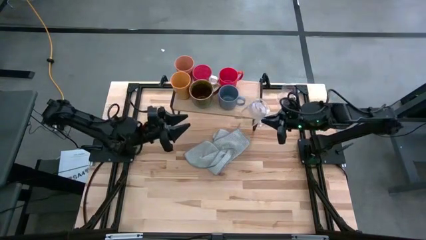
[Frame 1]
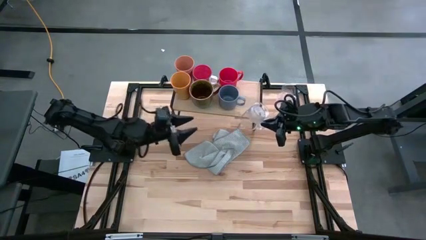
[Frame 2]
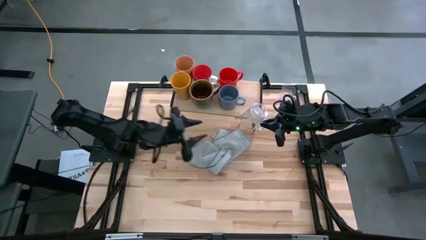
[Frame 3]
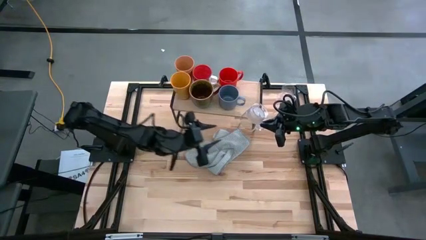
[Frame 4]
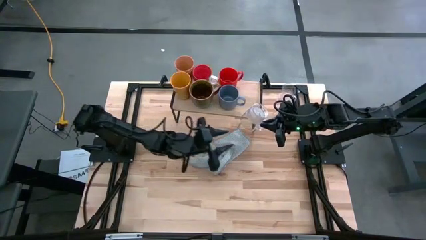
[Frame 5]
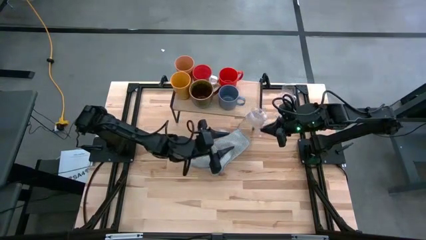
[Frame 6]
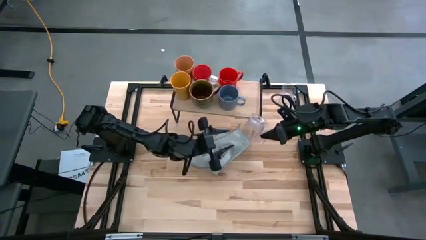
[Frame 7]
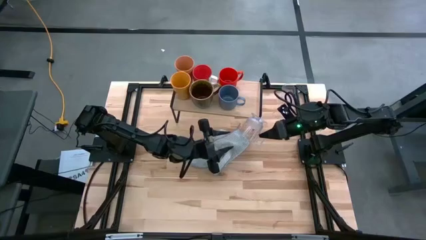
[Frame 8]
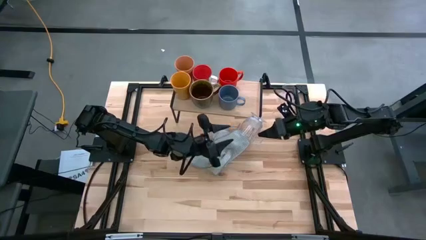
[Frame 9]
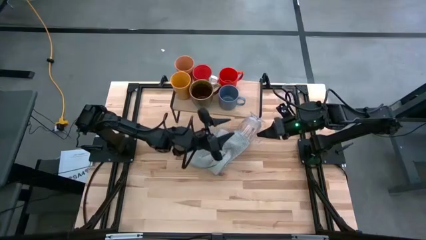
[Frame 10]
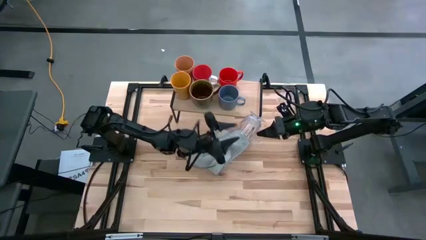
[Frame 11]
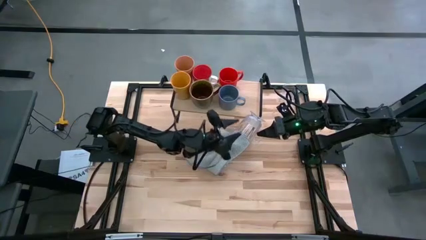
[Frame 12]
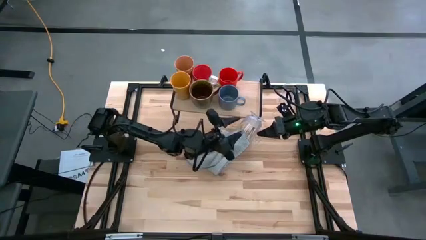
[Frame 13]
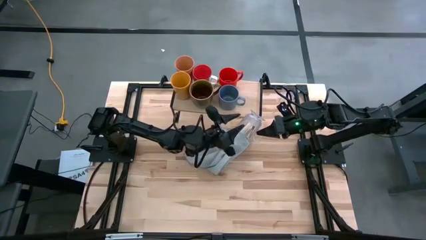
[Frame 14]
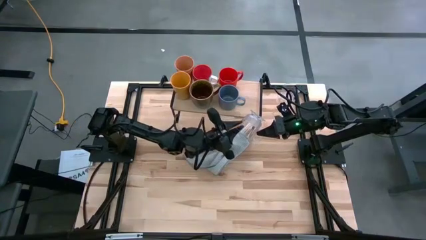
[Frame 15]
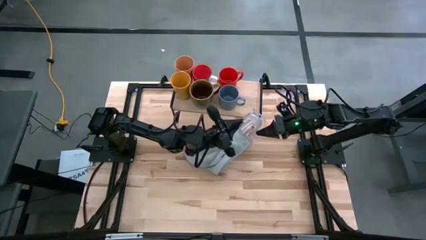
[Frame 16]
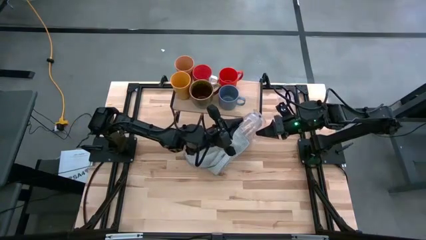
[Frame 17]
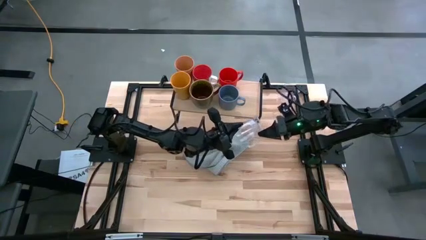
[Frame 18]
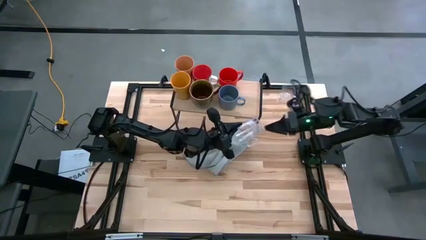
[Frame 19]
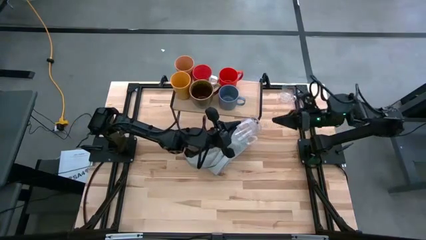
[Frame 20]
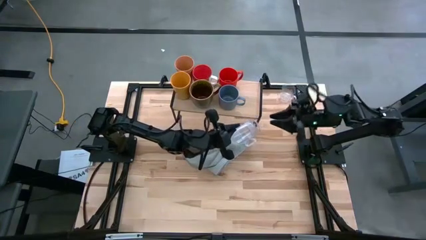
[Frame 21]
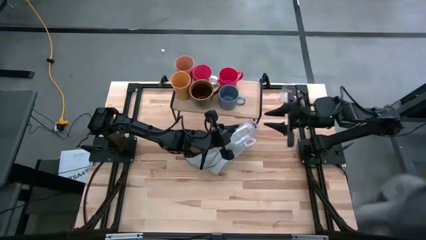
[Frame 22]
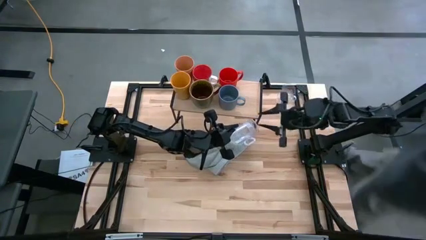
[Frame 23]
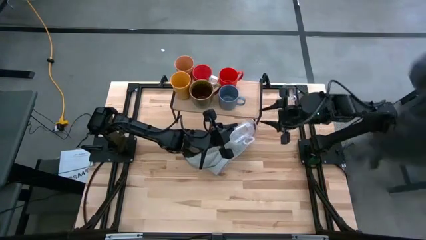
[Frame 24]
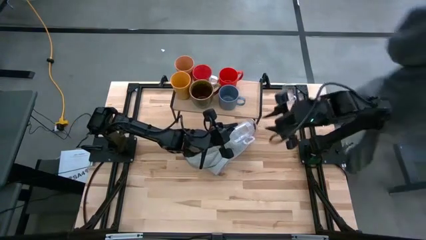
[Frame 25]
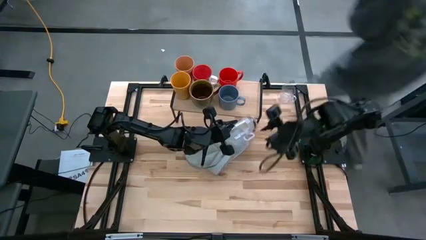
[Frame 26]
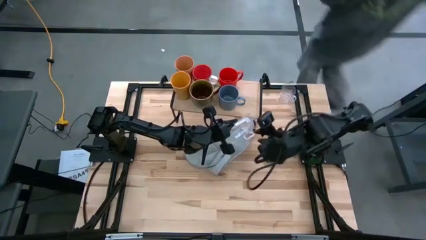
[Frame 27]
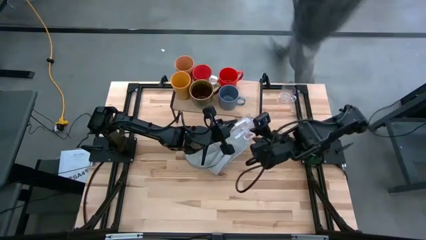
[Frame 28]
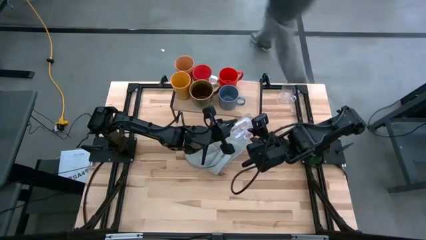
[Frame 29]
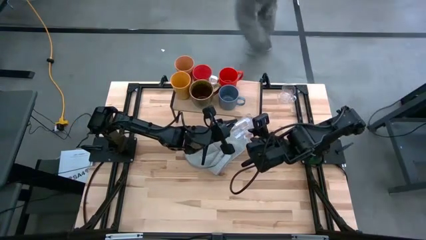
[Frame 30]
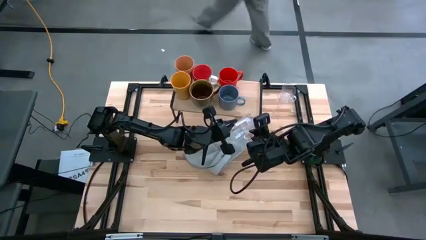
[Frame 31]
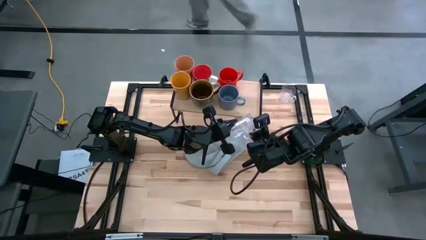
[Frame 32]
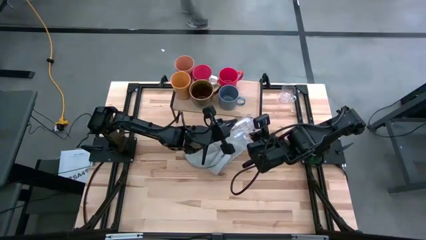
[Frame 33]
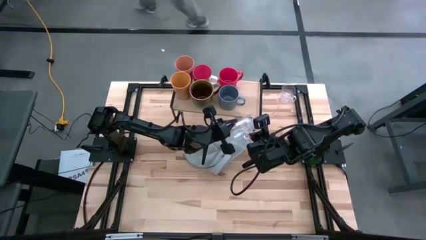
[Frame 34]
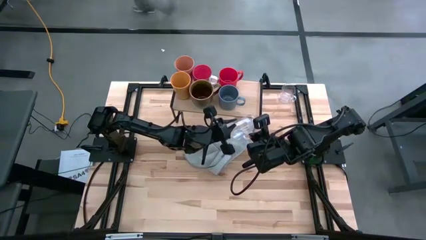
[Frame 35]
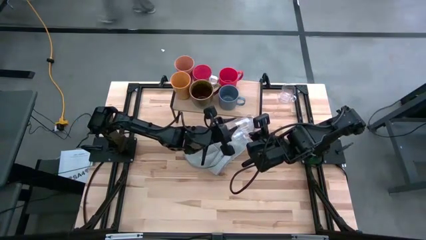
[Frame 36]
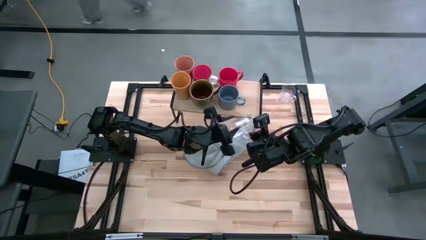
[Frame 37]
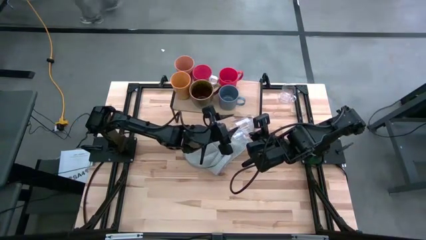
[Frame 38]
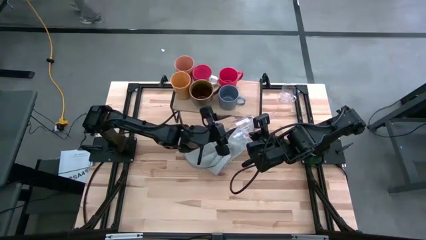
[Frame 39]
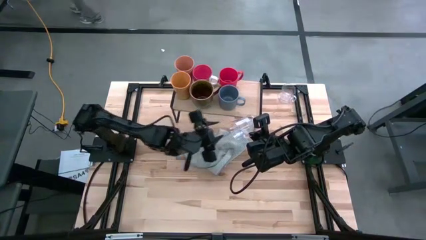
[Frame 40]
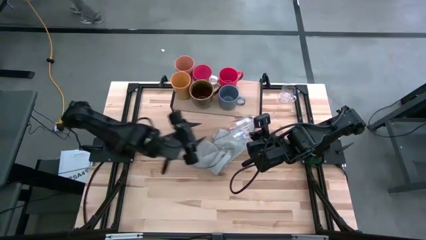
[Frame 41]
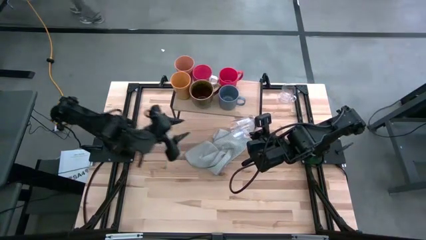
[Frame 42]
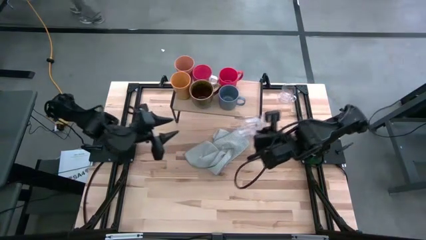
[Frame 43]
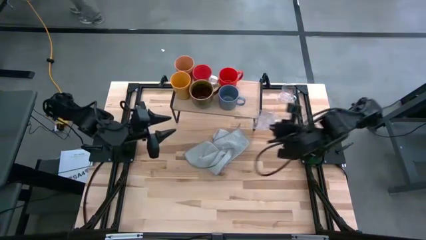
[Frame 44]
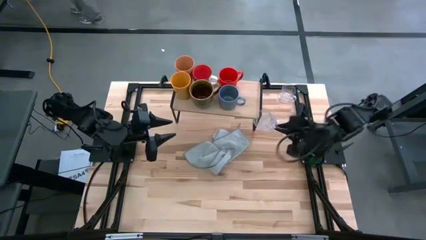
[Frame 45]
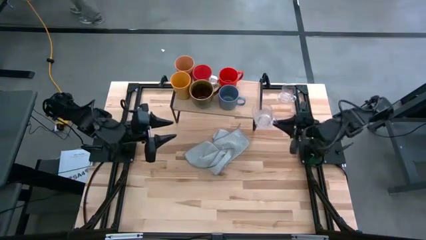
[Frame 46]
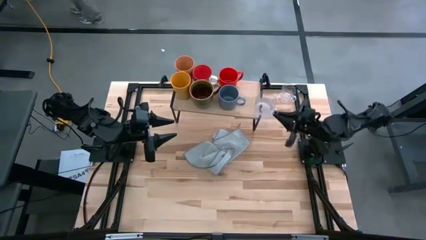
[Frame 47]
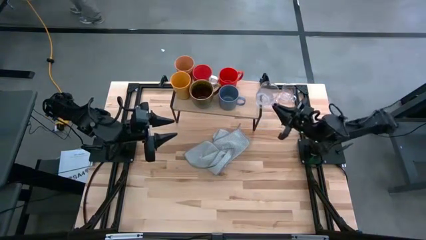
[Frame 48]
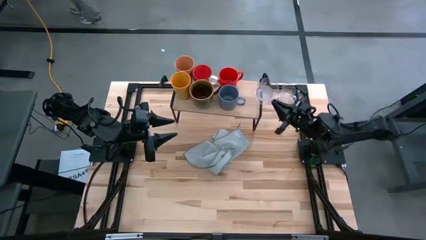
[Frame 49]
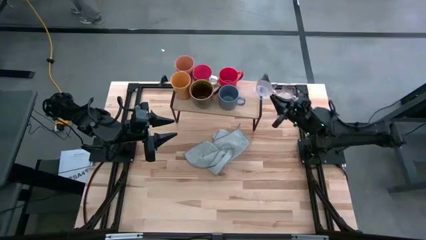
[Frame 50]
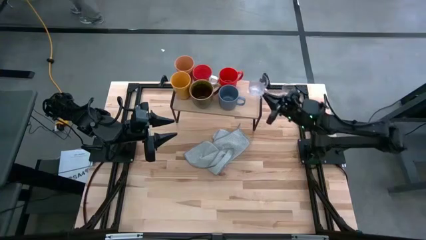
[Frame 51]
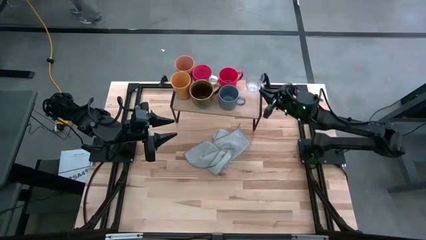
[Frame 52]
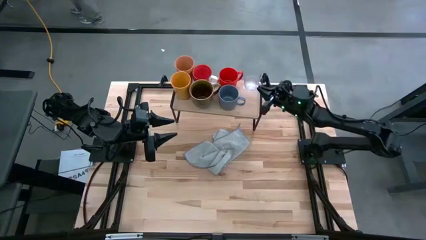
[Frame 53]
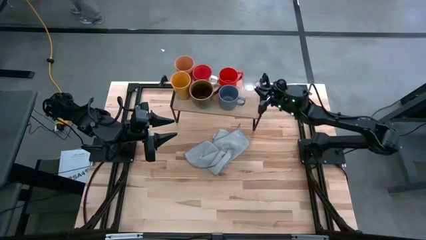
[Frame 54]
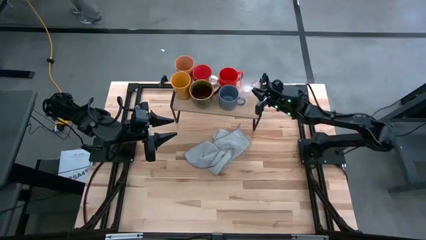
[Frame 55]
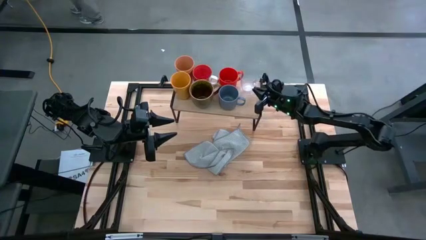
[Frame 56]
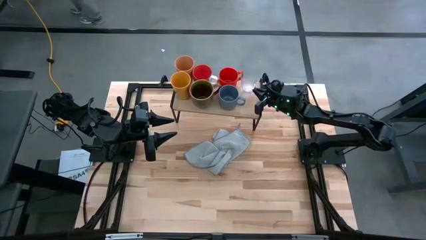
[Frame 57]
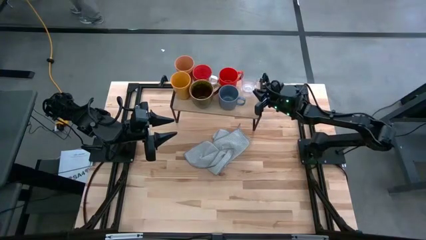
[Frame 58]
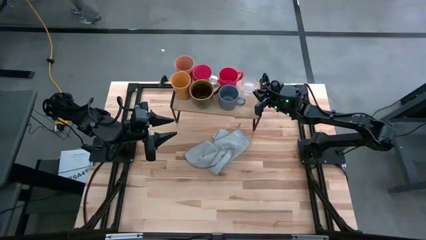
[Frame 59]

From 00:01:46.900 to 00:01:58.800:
Task: Stack small to large cups/mugs on shelf
Put the left transparent mug on the shelf

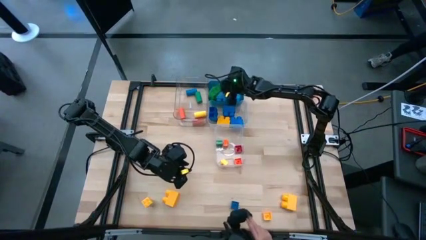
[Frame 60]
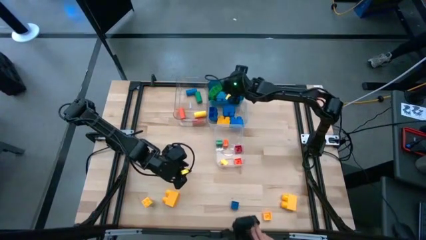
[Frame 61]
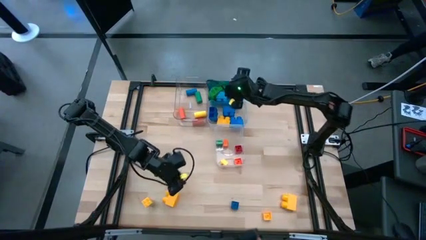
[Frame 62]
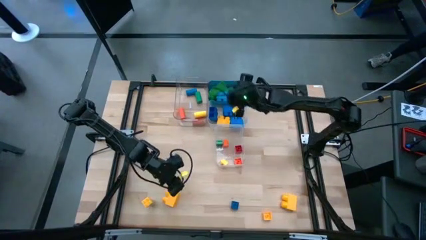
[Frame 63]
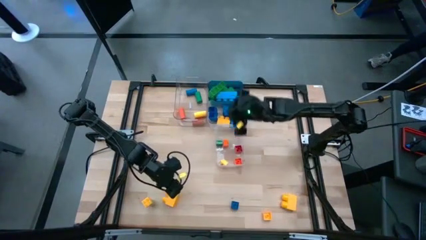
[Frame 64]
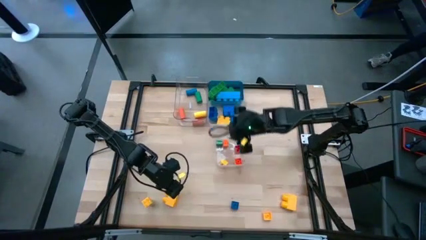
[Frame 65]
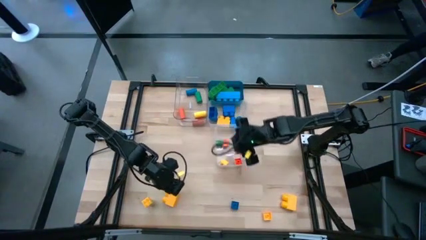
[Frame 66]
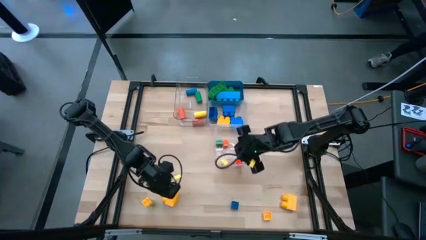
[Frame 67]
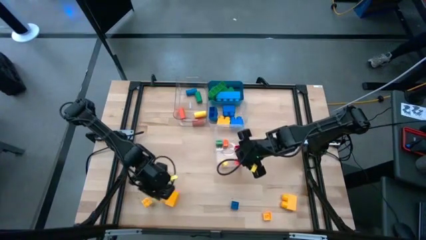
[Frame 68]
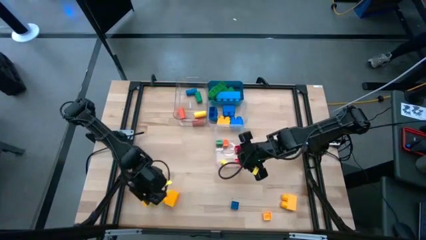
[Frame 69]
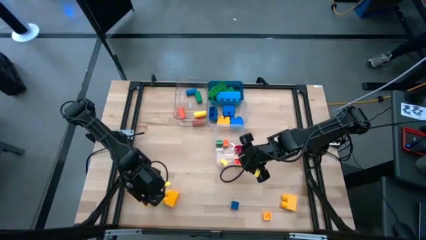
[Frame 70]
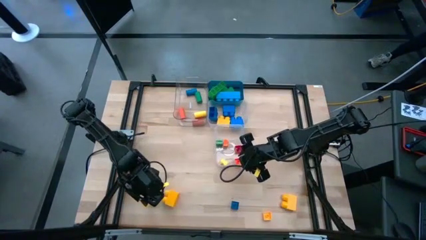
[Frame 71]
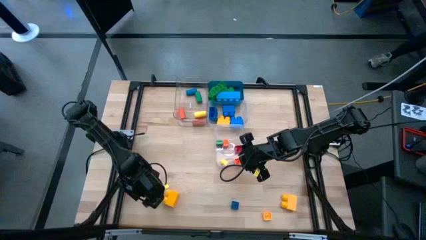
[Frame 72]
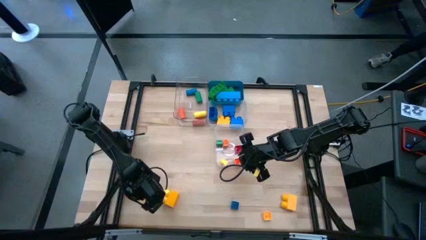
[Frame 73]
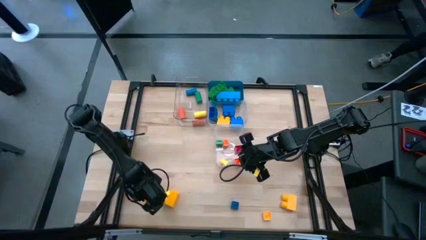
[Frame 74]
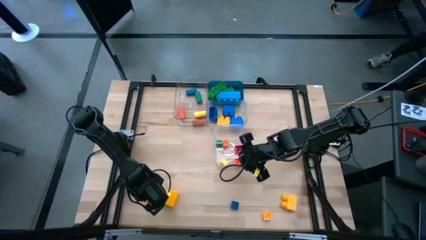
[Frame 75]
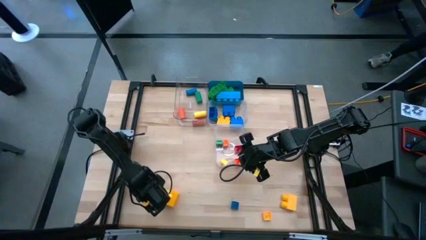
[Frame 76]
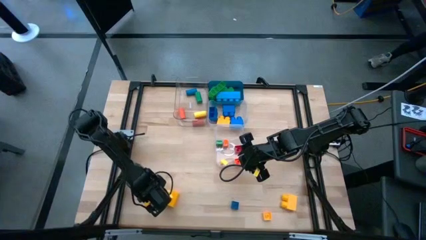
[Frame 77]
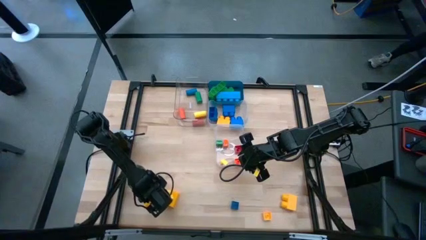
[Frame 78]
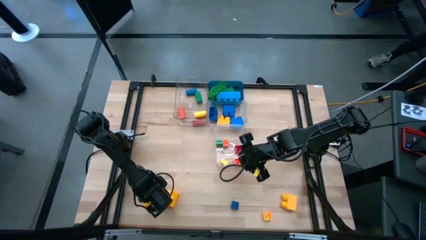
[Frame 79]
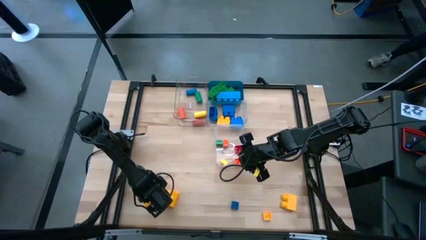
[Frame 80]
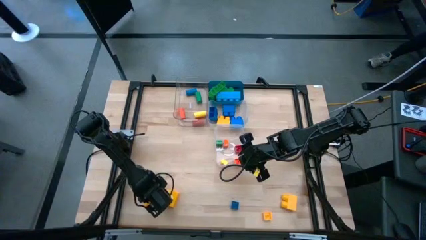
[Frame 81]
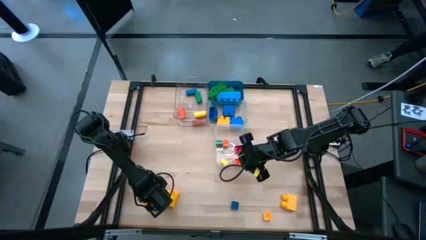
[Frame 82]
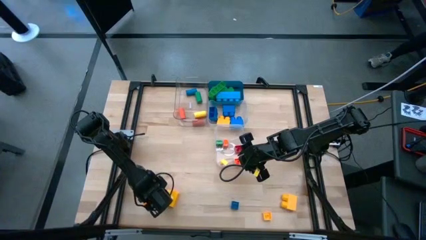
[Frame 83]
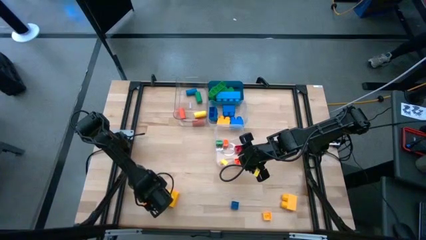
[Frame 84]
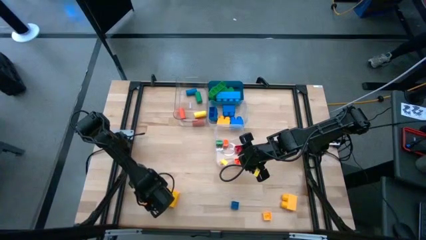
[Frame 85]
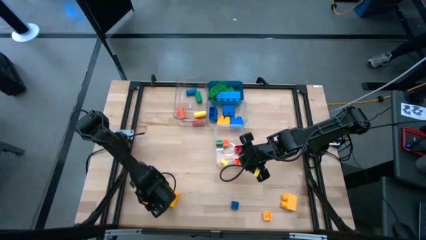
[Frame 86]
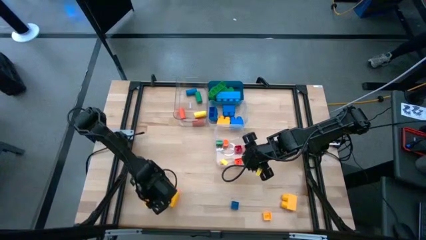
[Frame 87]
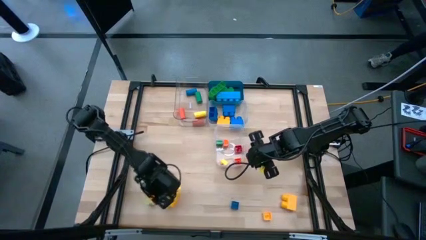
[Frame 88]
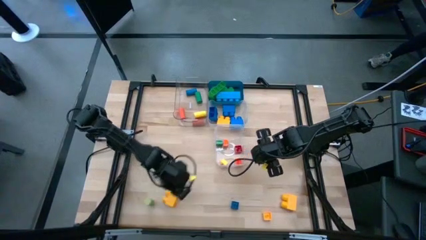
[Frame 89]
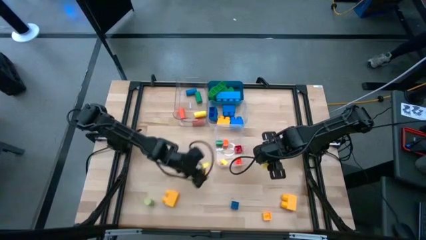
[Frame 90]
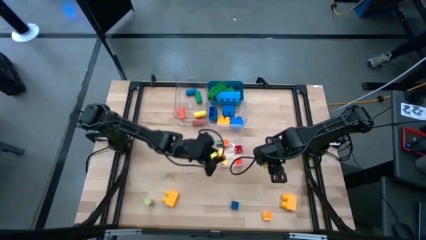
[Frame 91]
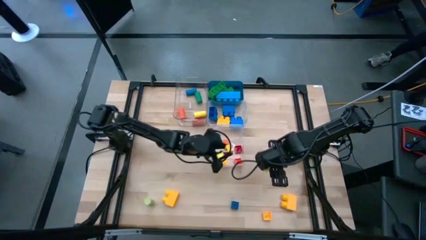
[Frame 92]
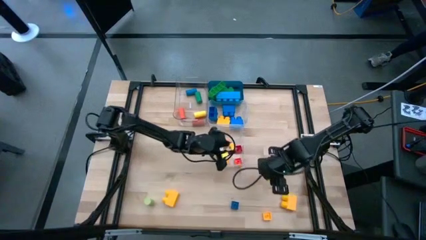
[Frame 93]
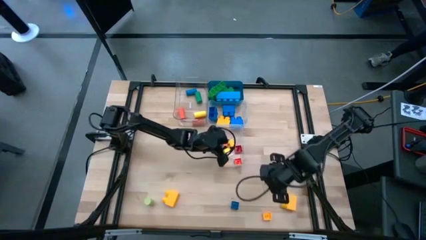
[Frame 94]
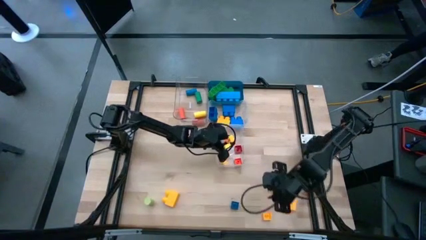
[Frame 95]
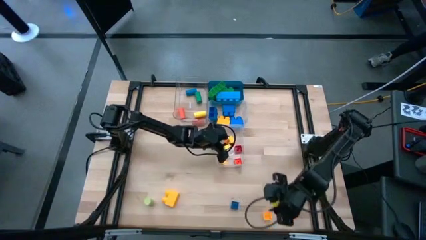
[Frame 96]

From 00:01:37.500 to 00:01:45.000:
Task: Sort blocks by size
Put the yellow 4 stud small game piece into the bottom transparent bin
